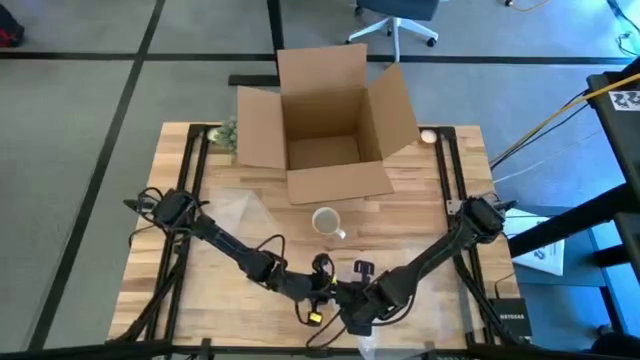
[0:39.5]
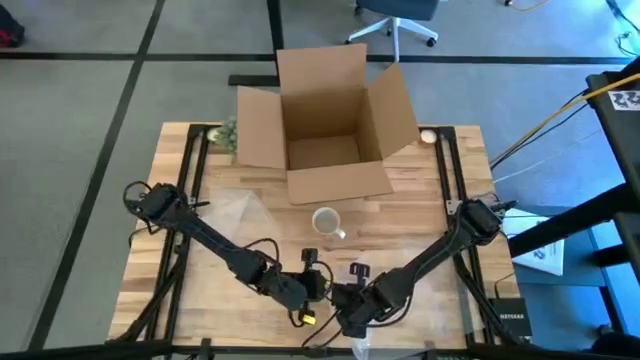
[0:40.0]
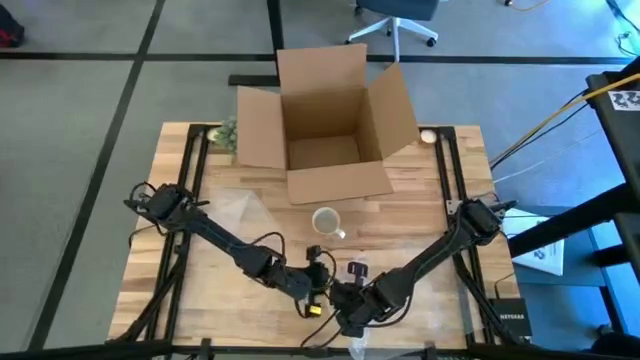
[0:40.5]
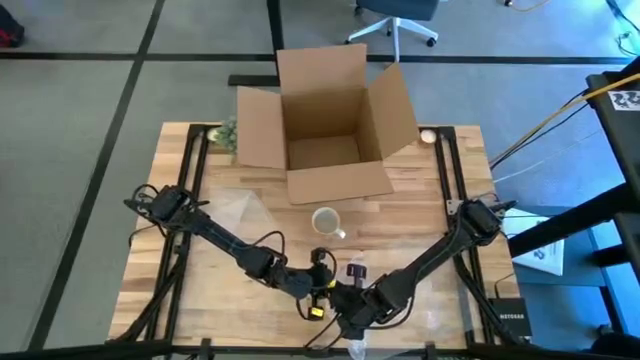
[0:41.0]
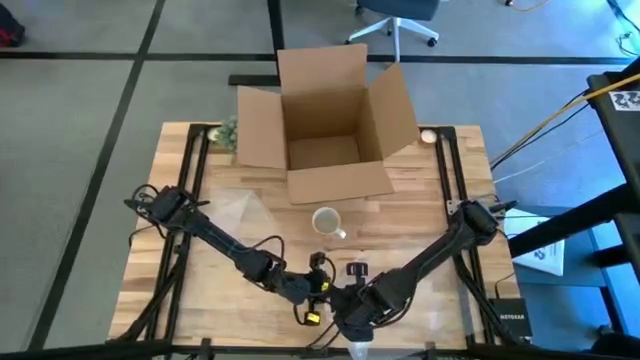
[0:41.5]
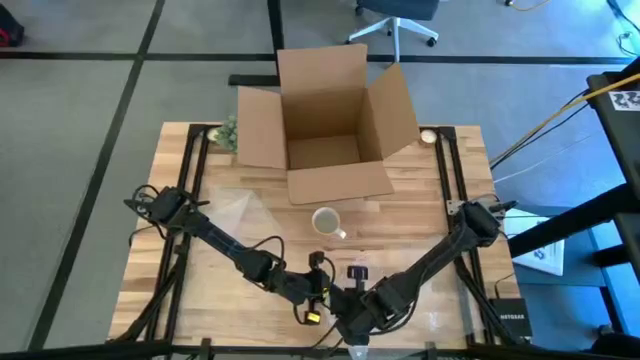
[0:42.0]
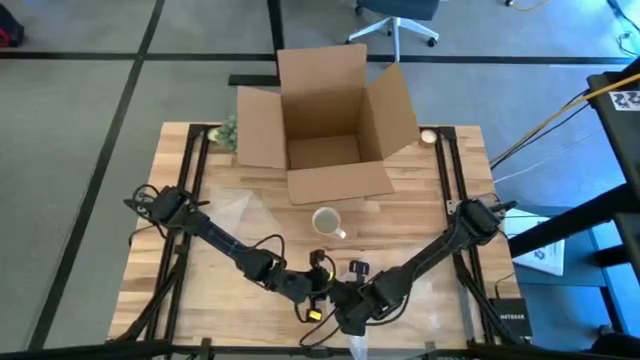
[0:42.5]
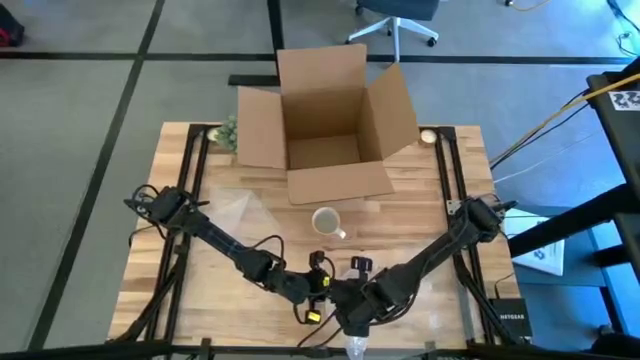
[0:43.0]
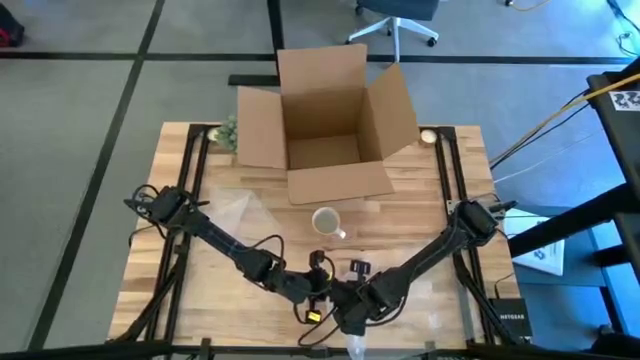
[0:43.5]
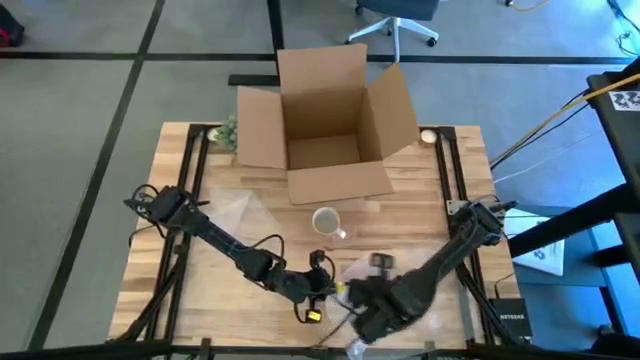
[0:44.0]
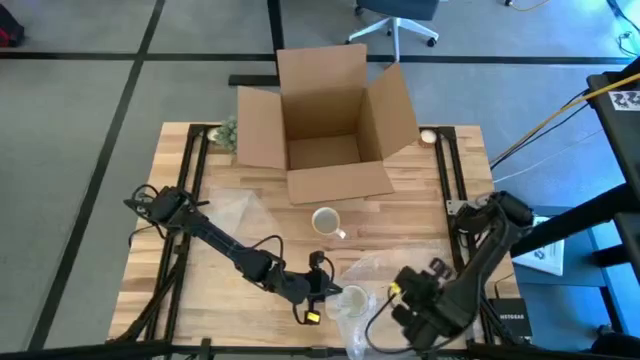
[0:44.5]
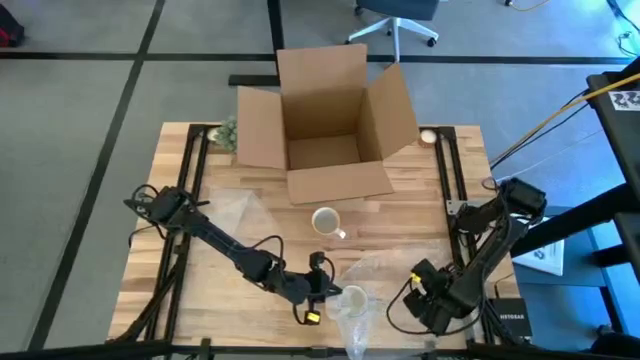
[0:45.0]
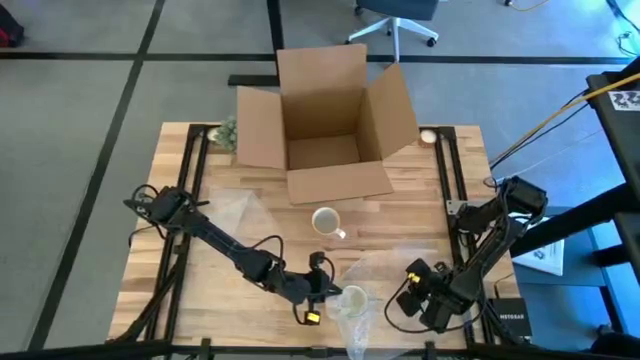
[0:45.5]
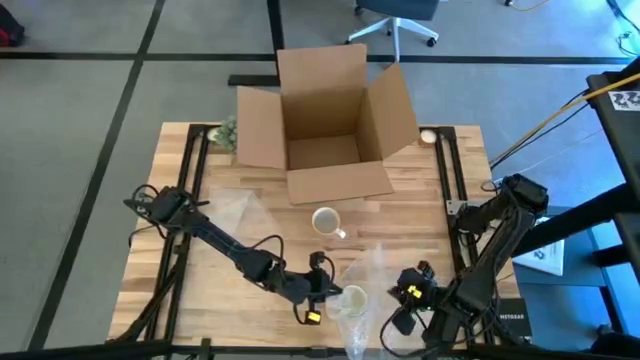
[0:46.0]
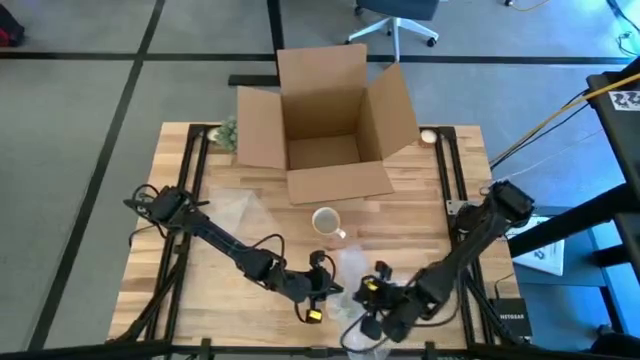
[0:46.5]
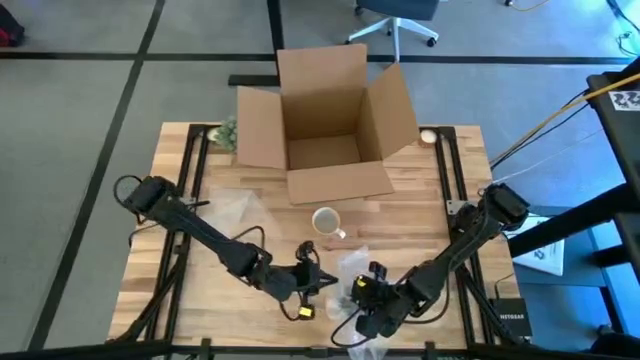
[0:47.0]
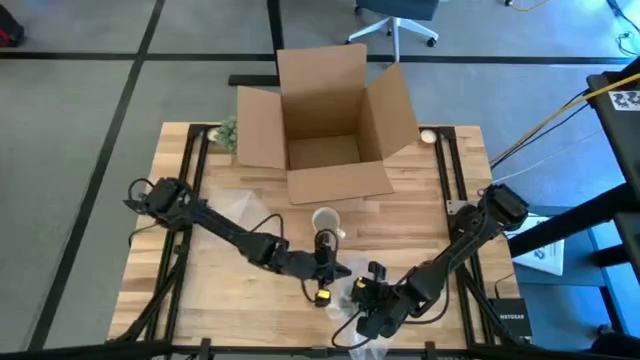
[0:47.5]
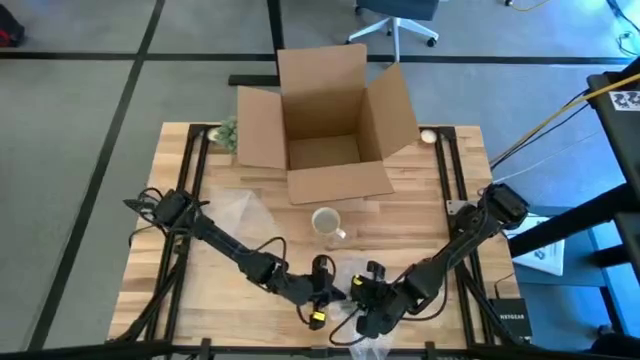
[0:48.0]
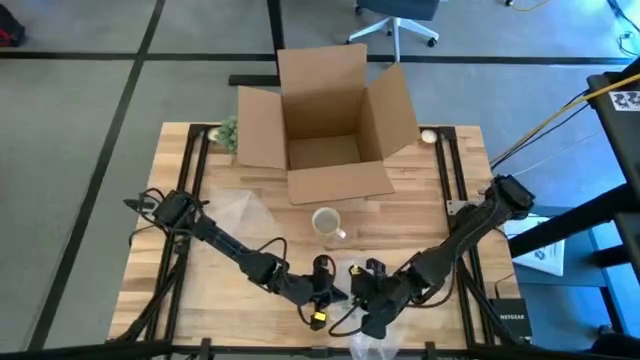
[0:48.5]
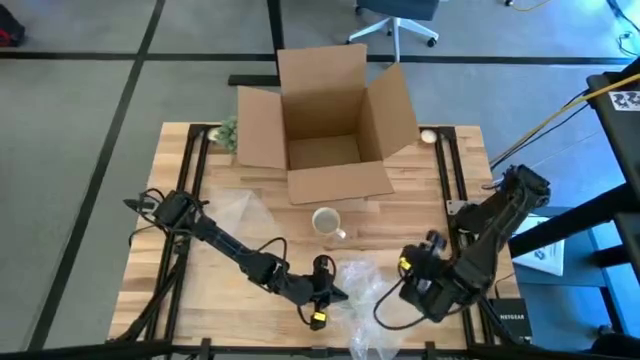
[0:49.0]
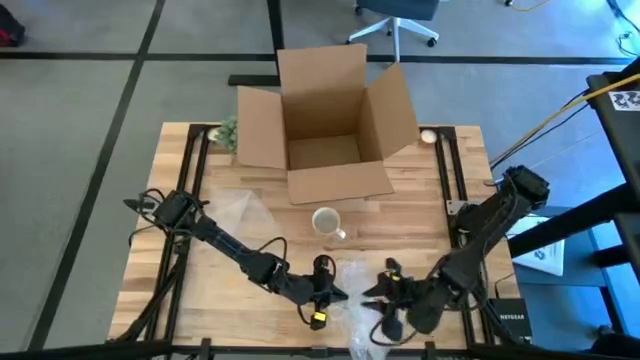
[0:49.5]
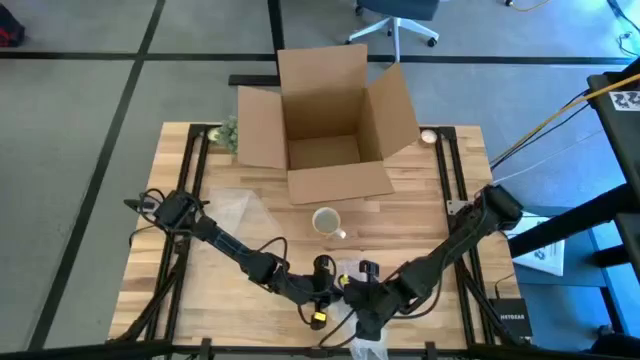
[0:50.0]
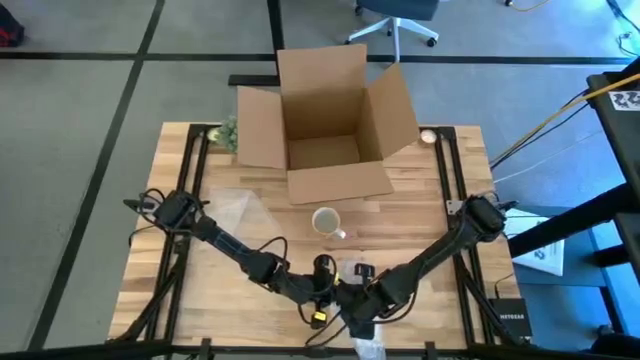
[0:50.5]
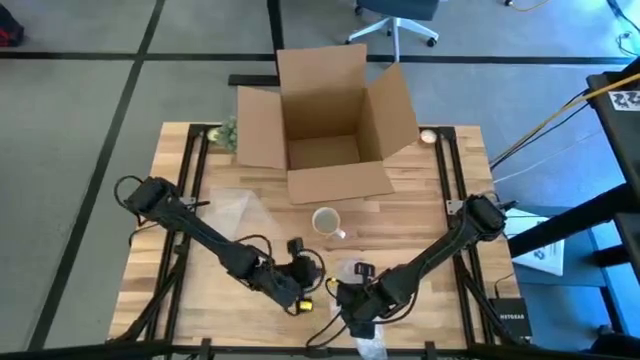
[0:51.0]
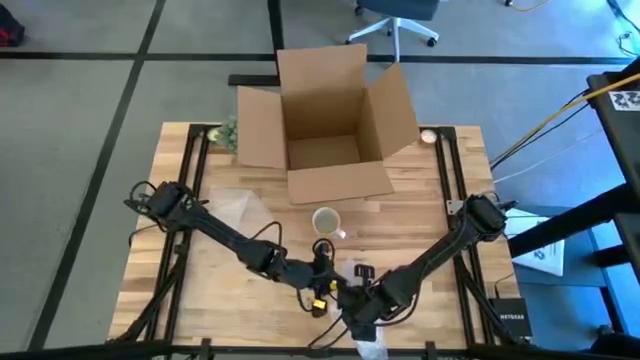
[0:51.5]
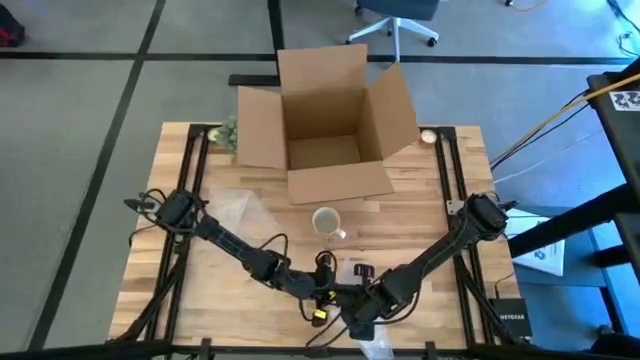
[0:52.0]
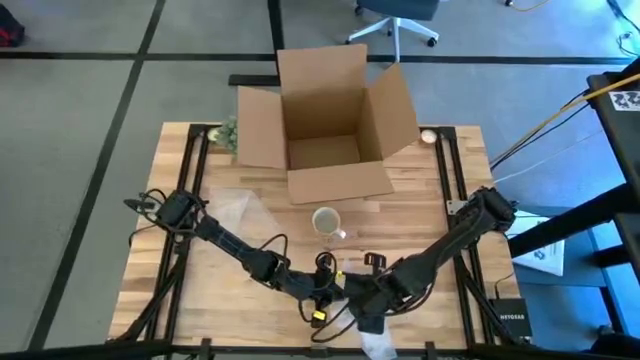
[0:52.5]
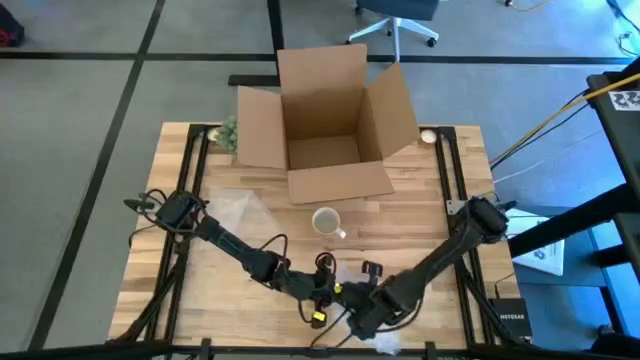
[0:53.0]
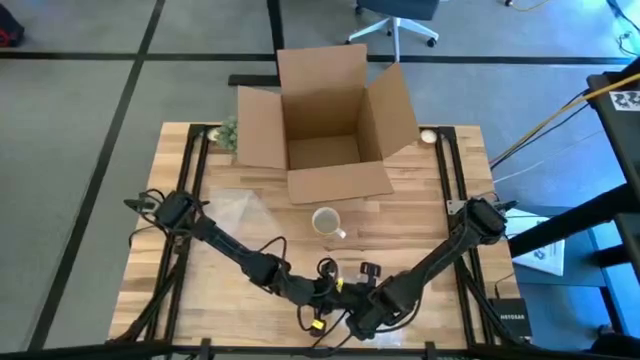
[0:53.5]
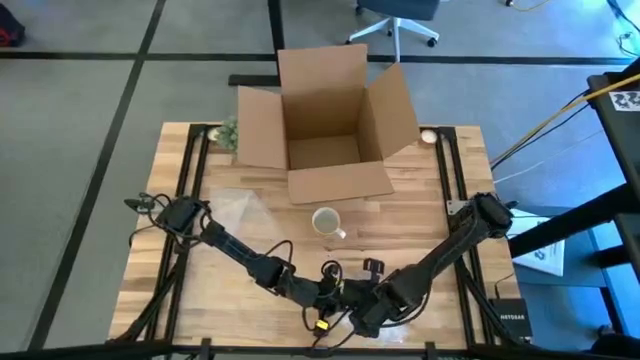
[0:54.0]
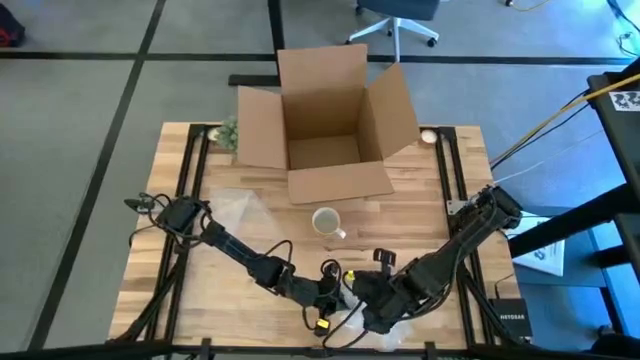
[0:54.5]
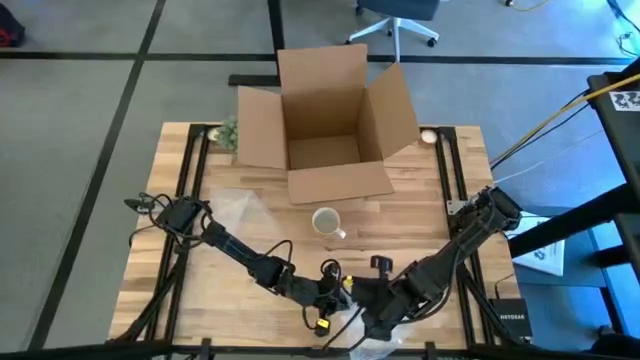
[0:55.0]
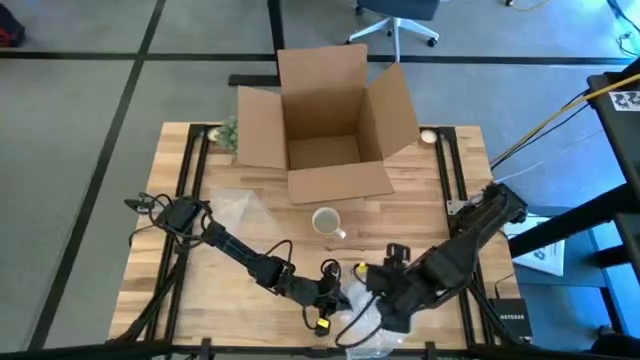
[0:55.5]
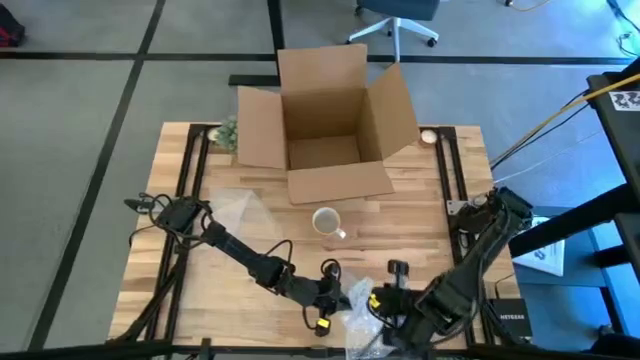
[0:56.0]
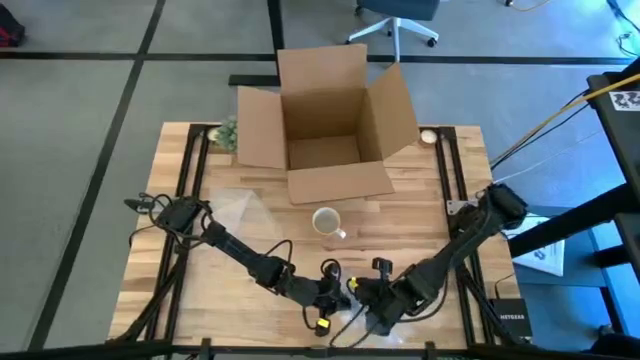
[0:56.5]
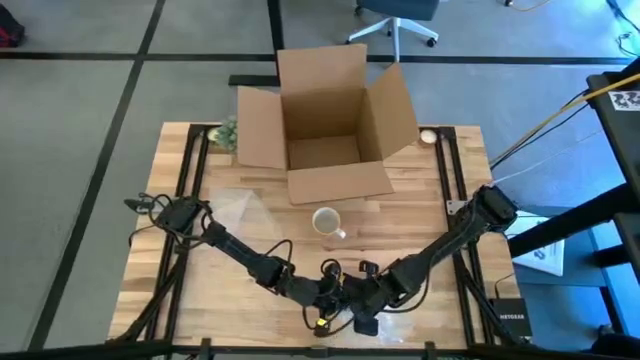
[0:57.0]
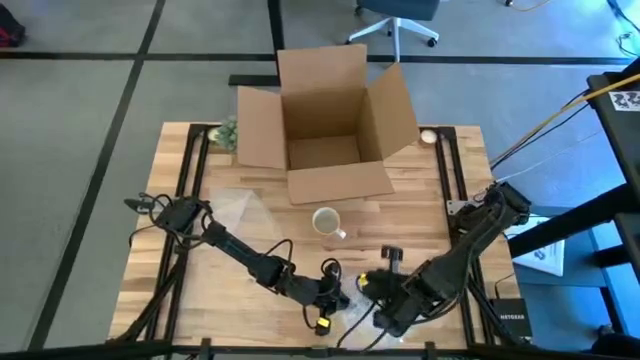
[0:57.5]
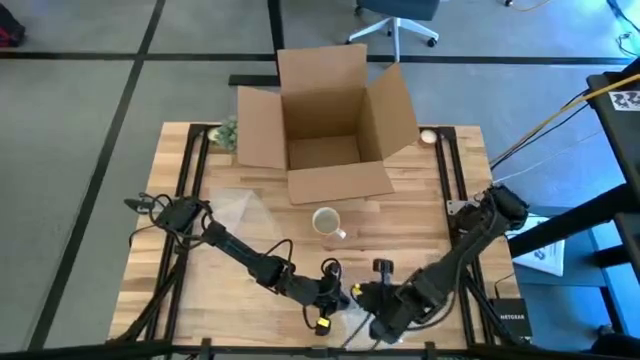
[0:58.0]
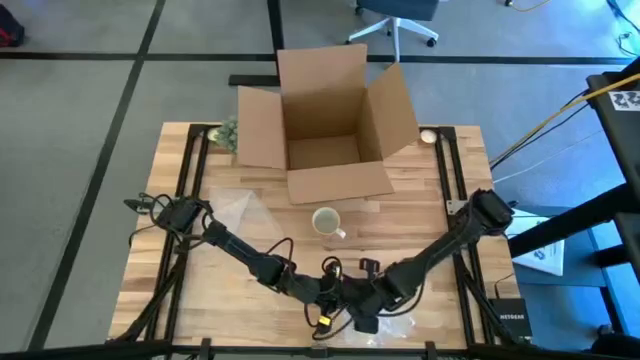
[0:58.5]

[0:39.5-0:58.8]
Task: wrap mug
Wrap the red mug with transparent bubble wrap

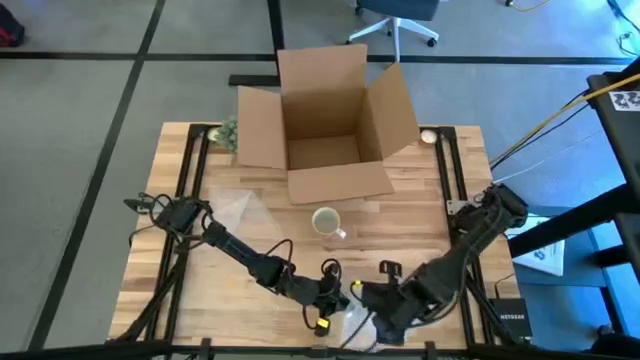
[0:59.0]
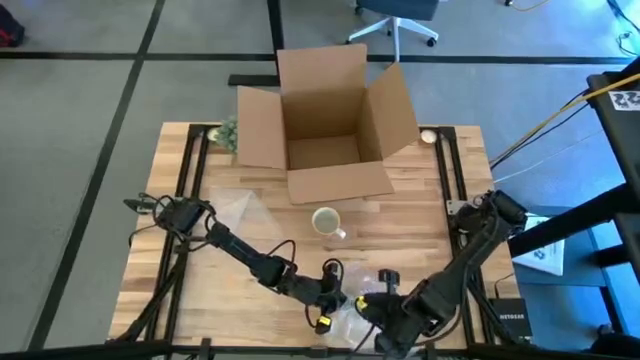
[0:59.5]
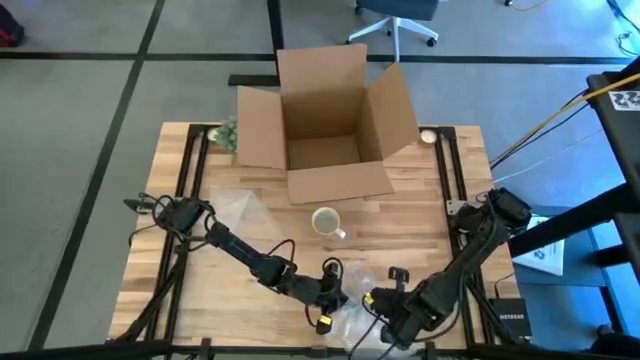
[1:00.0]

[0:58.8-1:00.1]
Wrap the red mug with transparent bubble wrap

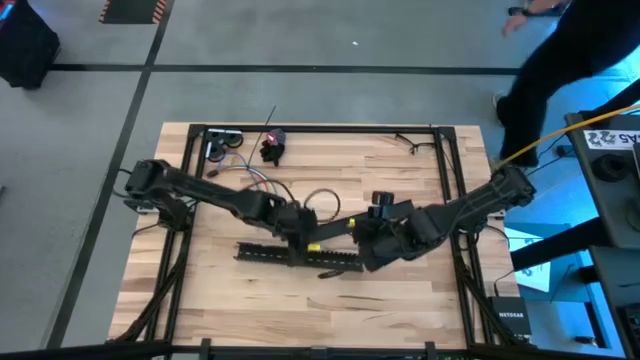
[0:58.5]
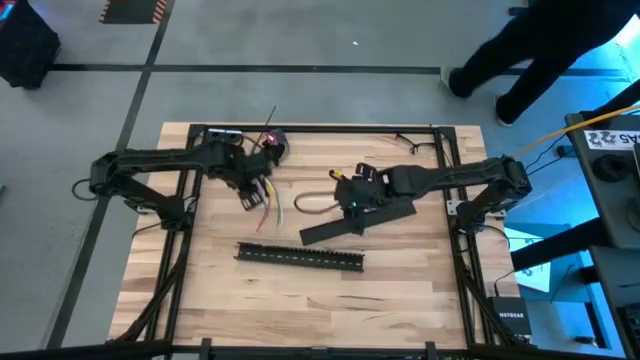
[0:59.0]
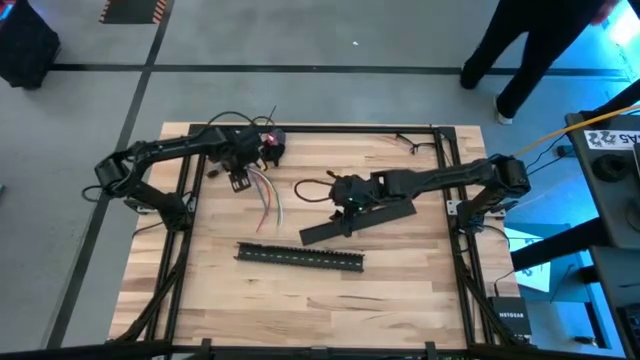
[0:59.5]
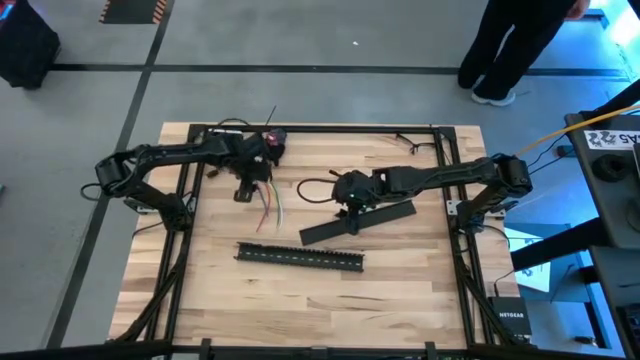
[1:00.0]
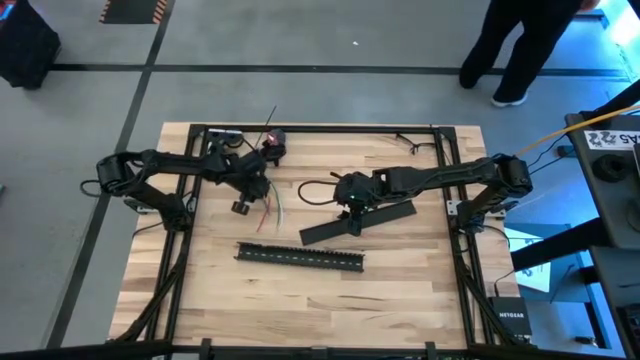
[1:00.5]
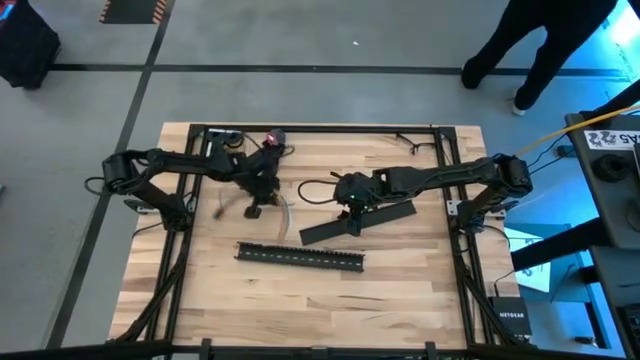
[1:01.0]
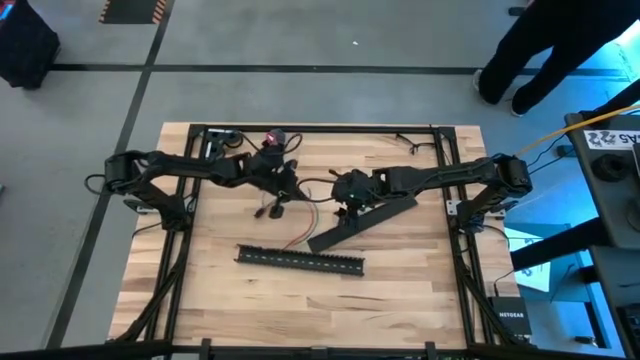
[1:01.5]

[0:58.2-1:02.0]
Task: Ziptie cables
Put the cable wires into the black cable duct
